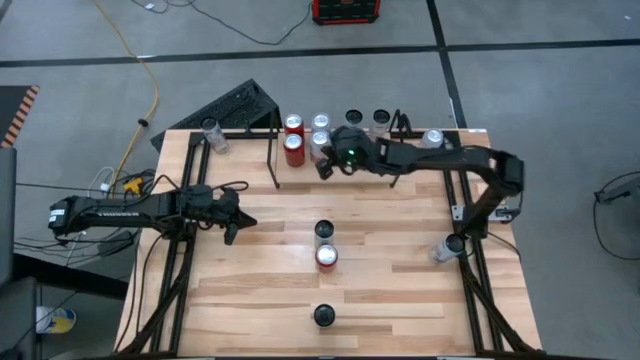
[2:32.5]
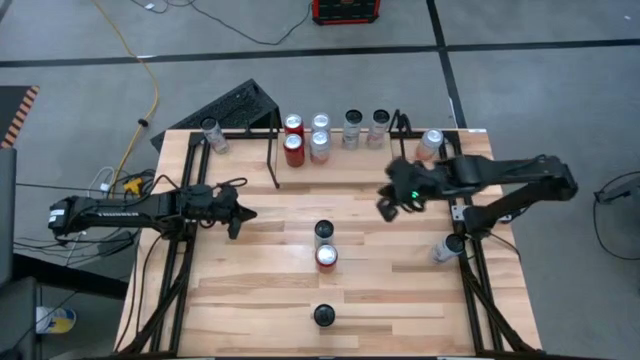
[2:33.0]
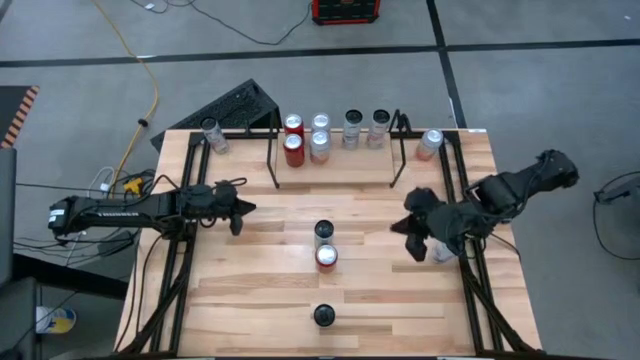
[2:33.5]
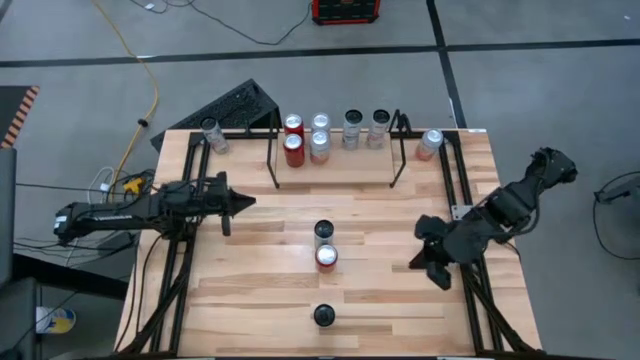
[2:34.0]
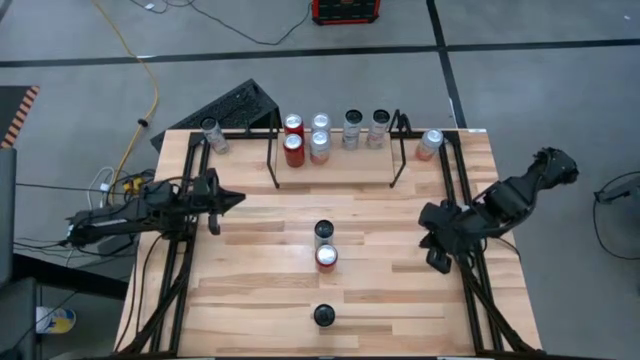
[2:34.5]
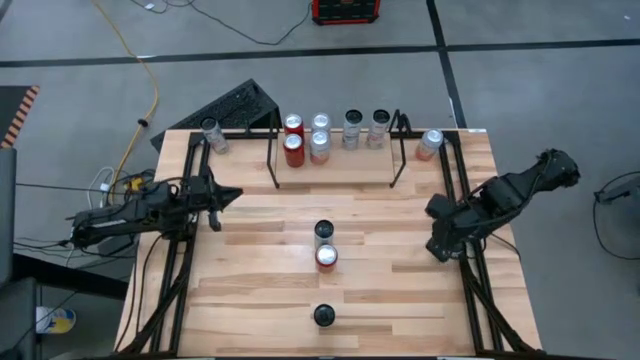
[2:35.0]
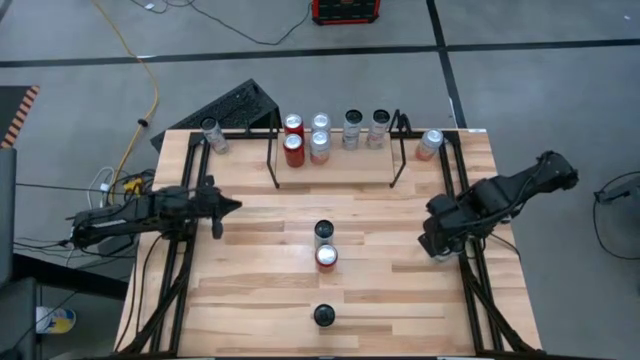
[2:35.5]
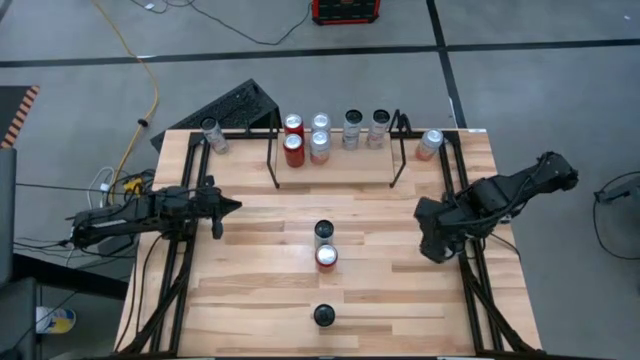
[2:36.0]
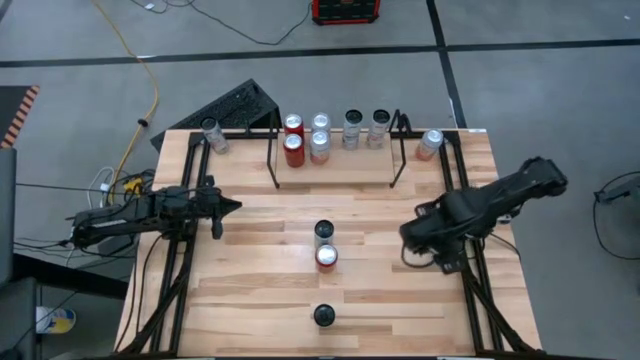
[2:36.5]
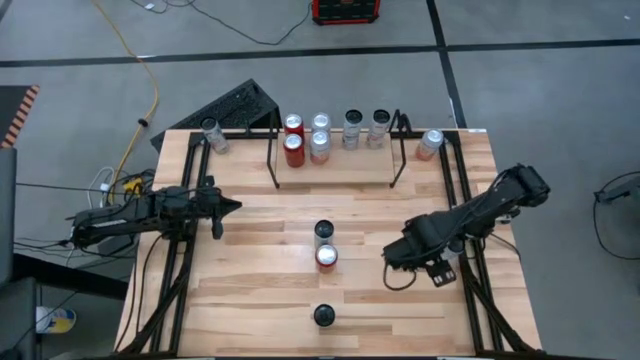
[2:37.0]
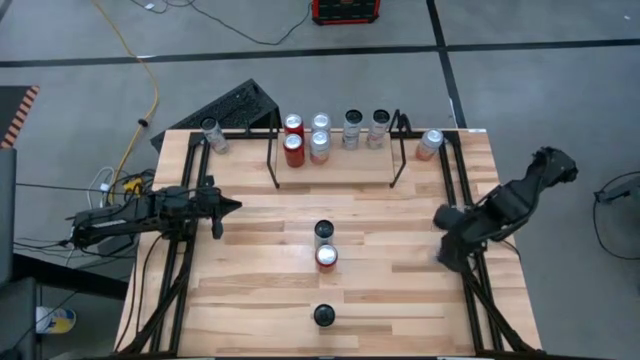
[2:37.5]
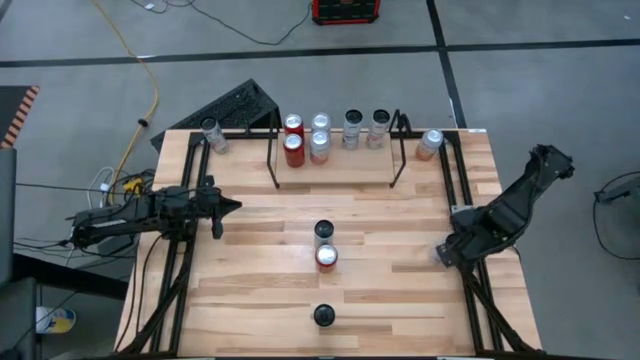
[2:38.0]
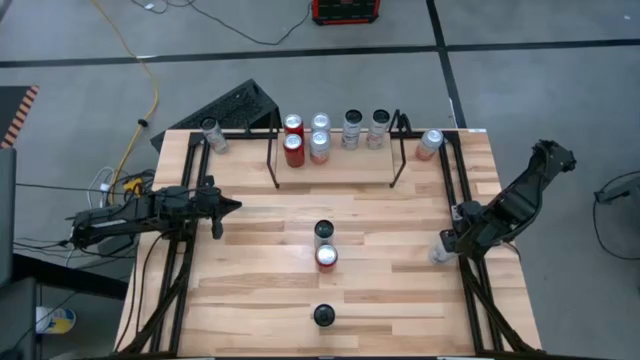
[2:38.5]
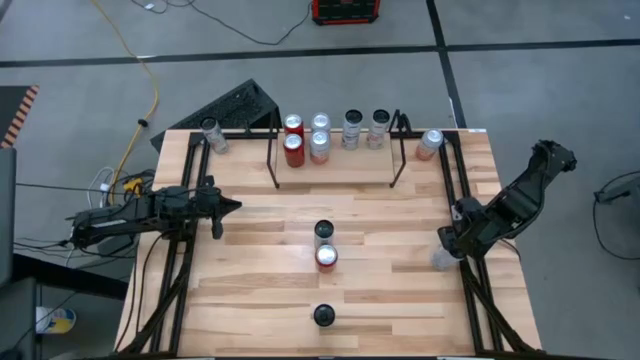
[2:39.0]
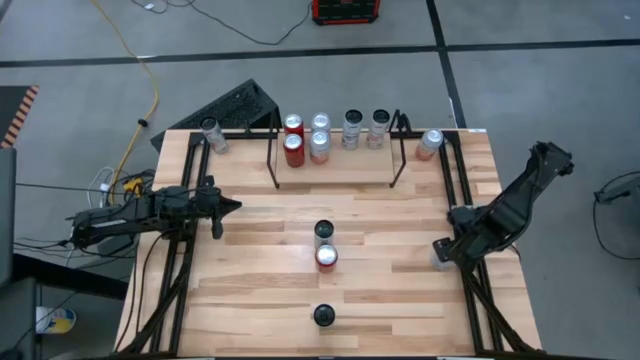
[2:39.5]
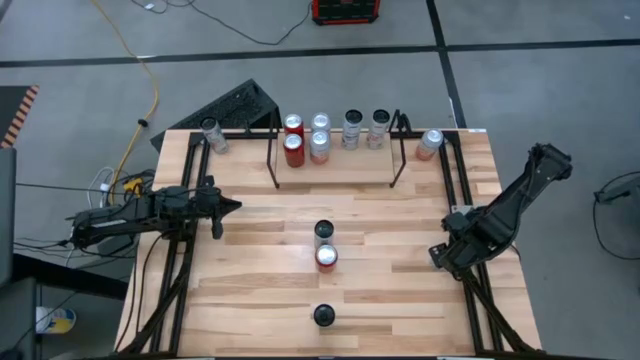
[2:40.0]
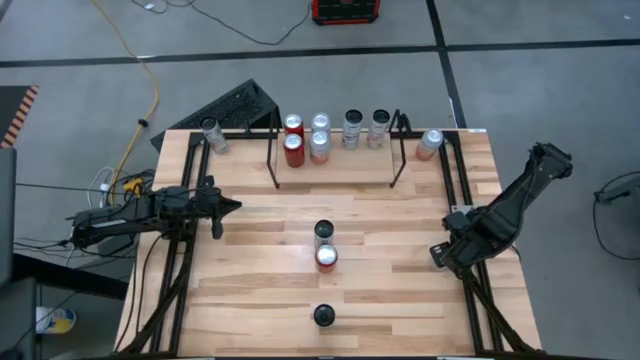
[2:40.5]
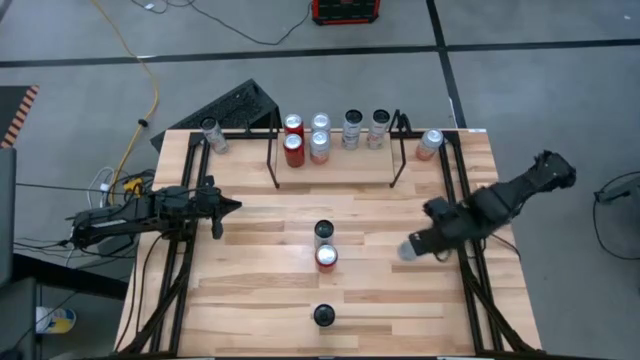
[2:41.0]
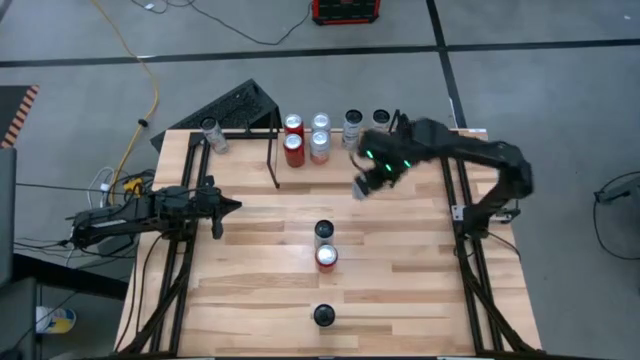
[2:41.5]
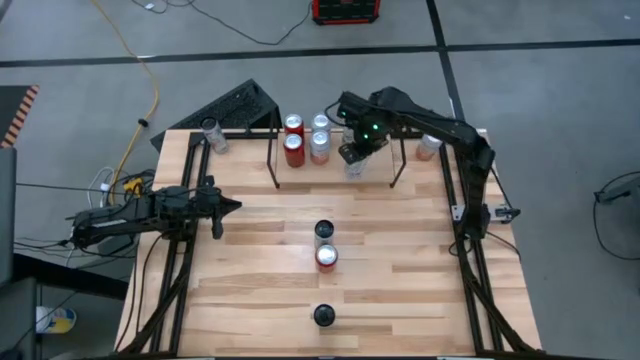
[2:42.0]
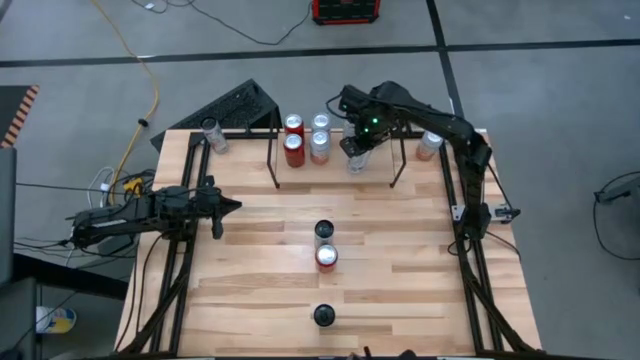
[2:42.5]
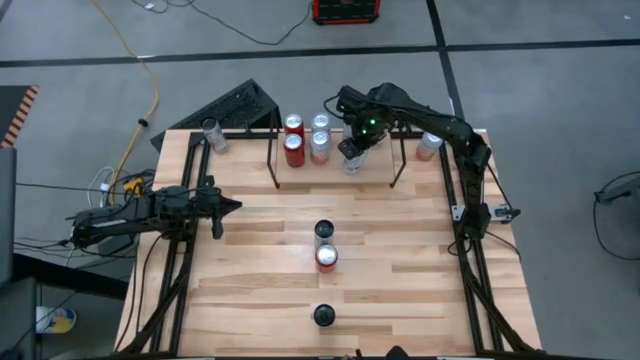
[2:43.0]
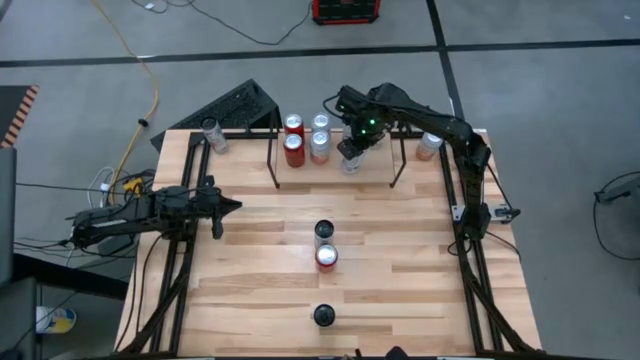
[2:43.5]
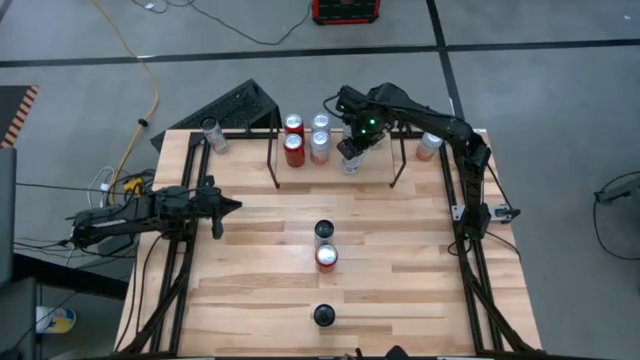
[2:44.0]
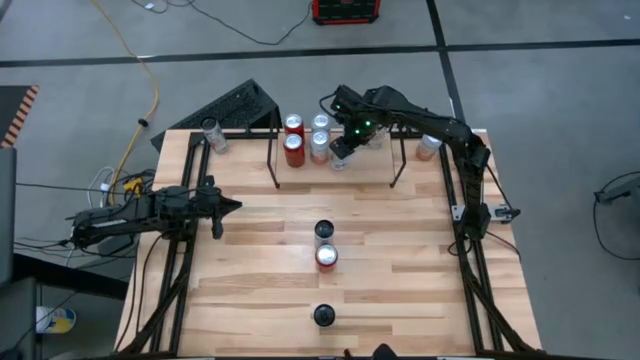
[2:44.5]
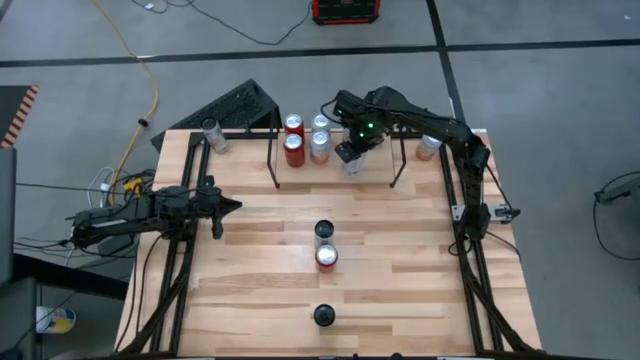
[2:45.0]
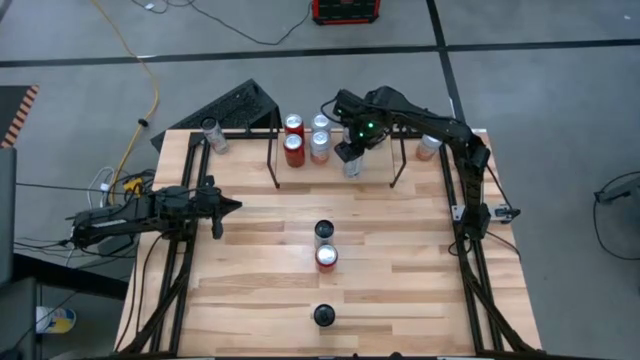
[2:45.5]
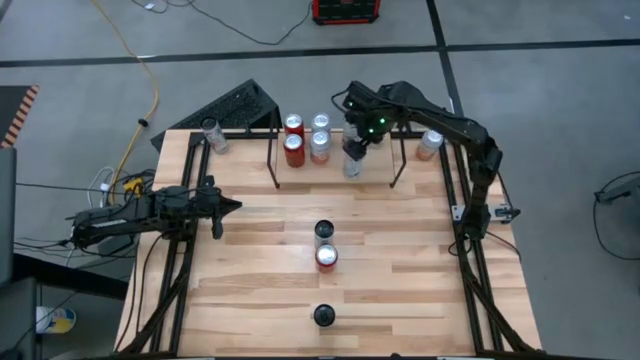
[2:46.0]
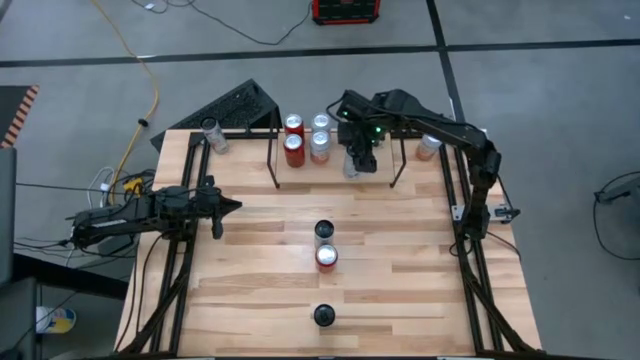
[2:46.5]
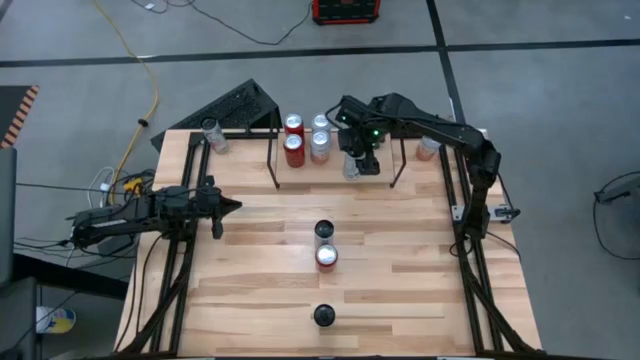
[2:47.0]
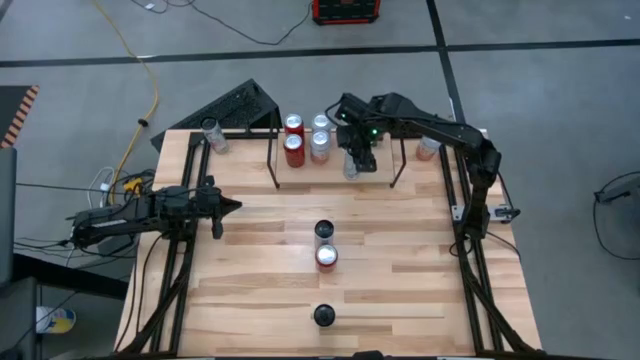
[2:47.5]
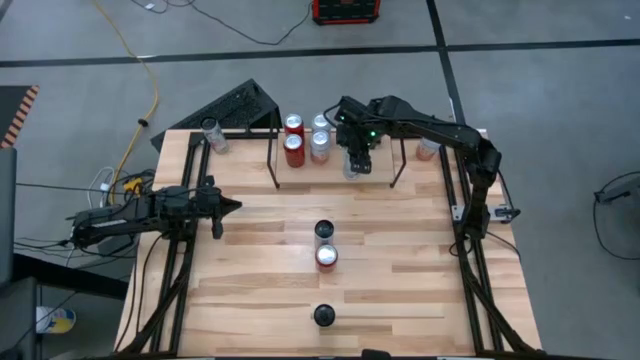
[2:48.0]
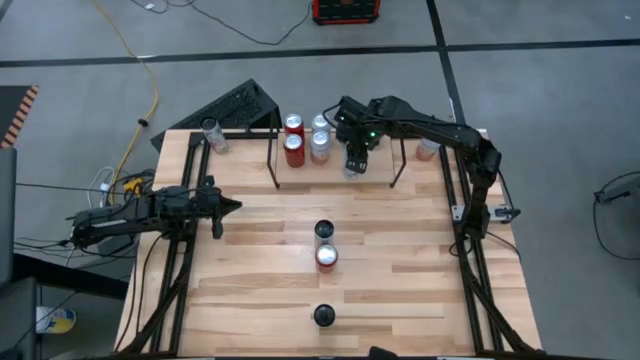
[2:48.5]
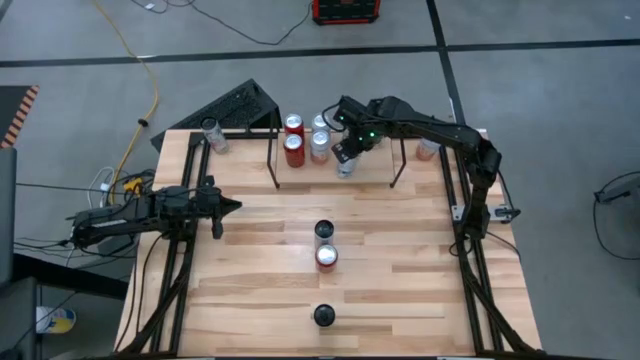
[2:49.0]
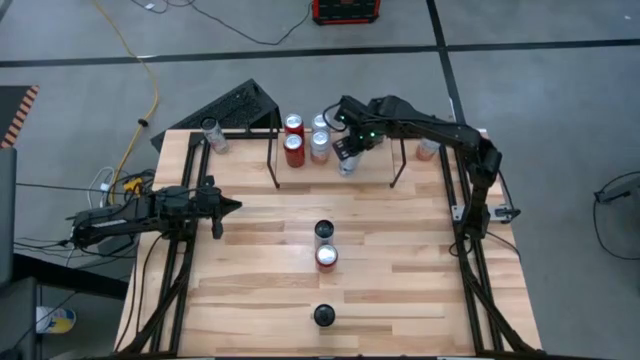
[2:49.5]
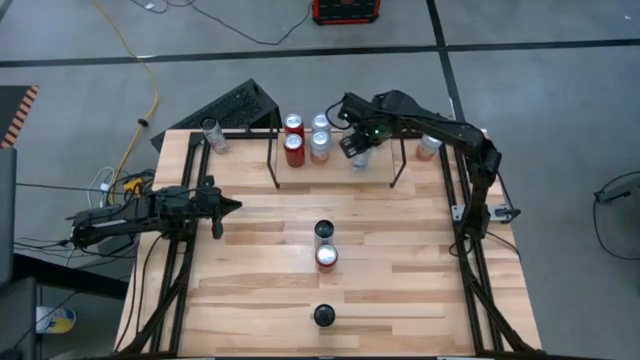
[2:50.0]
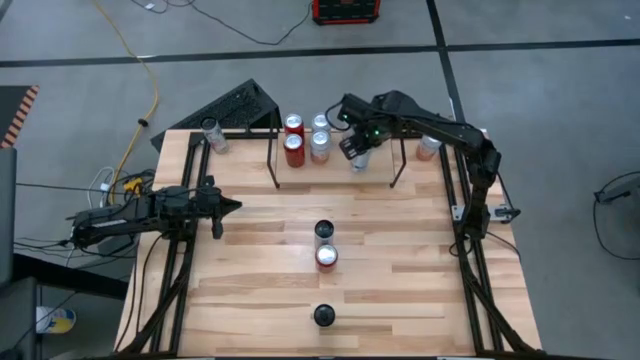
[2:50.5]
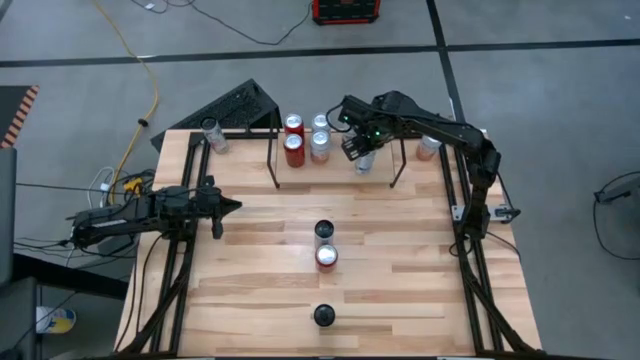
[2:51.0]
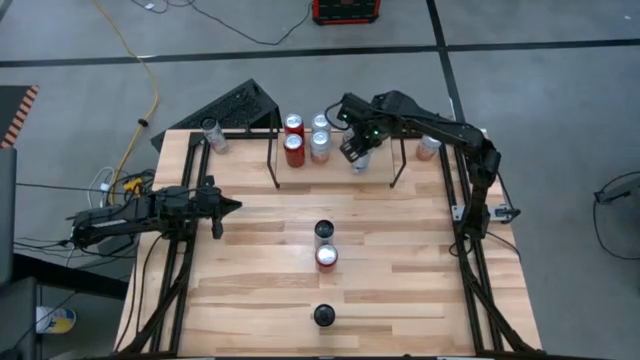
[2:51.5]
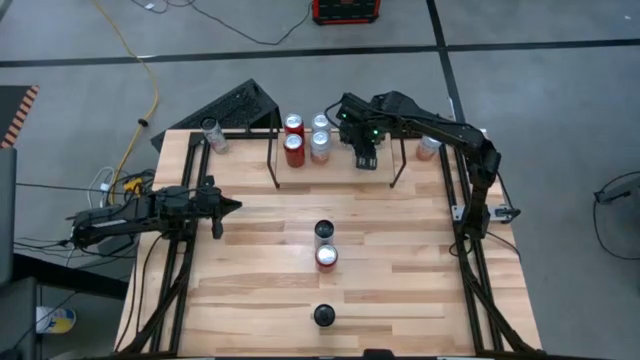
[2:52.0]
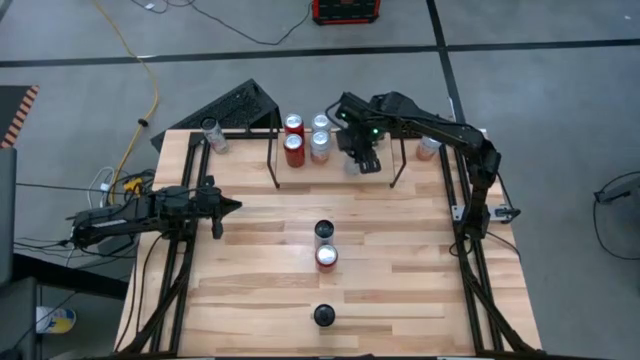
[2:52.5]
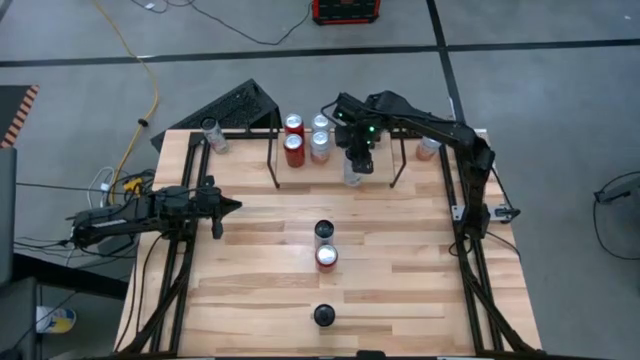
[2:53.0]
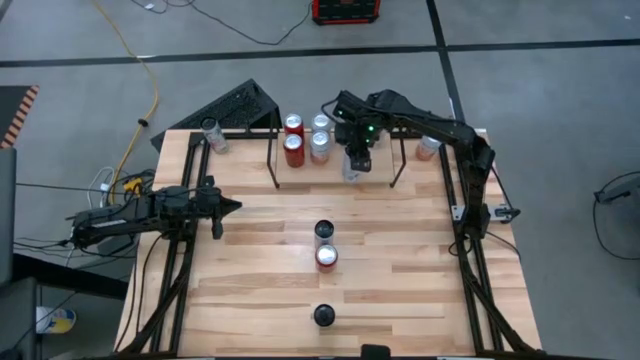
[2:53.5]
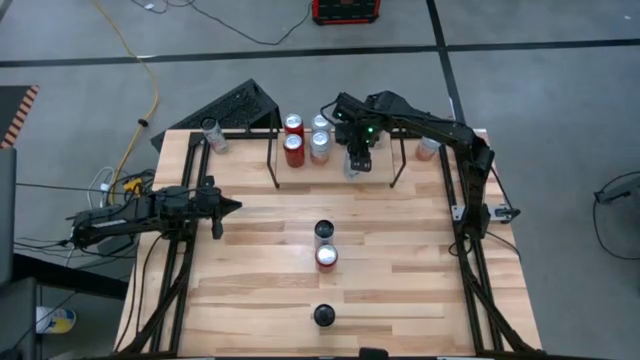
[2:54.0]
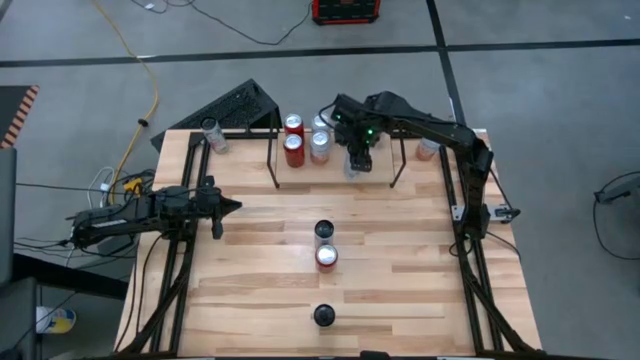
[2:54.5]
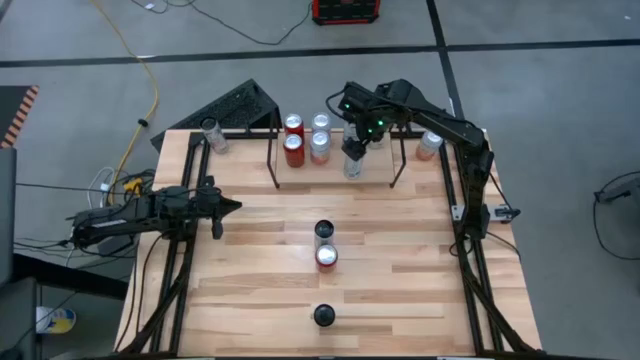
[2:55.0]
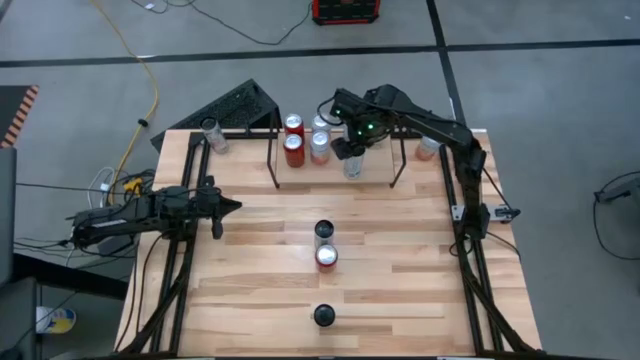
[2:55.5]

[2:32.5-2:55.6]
Task: Place canned beverage on shelf
Put the right white blue soda can on the shelf aligned with the other white blue soda can
